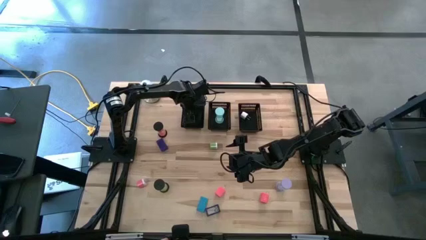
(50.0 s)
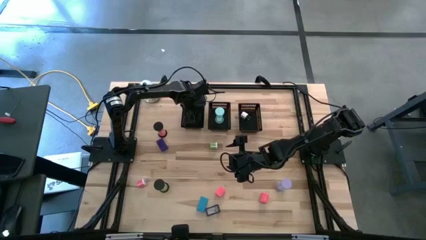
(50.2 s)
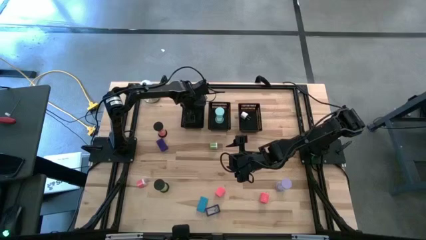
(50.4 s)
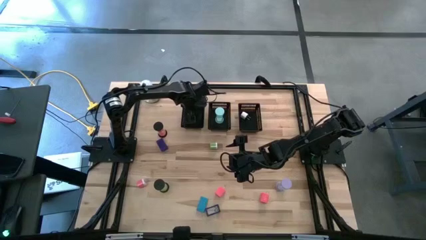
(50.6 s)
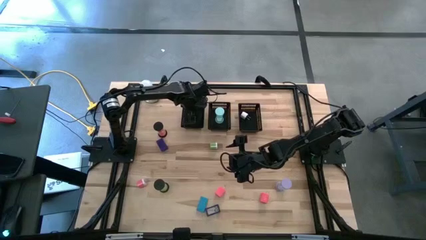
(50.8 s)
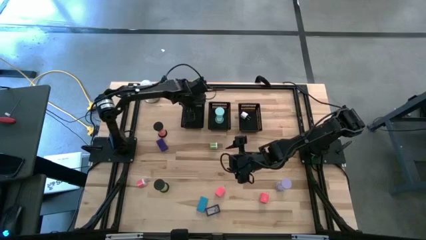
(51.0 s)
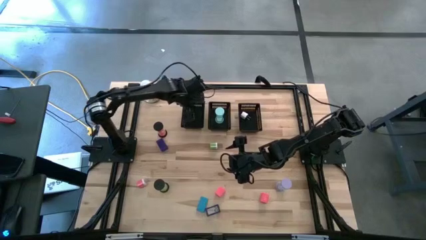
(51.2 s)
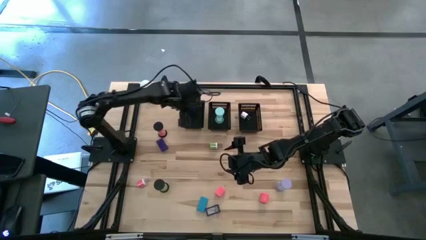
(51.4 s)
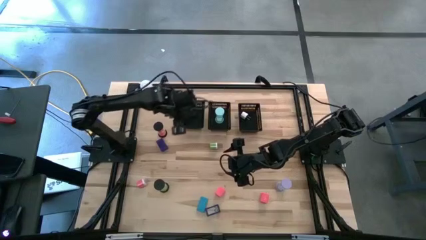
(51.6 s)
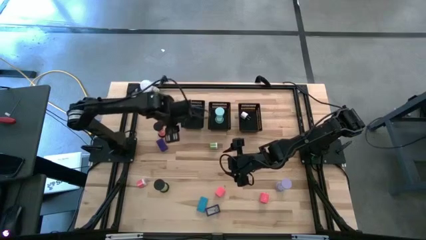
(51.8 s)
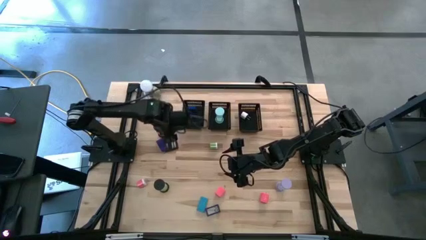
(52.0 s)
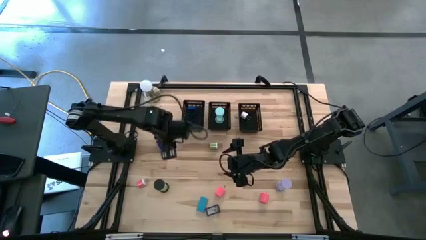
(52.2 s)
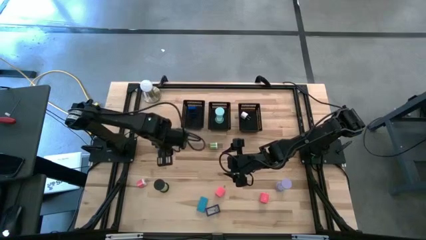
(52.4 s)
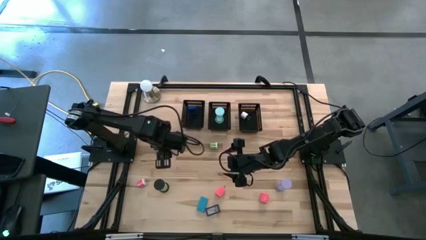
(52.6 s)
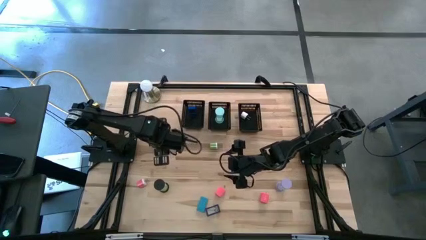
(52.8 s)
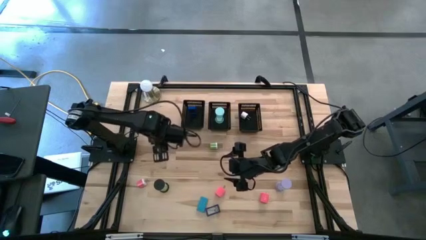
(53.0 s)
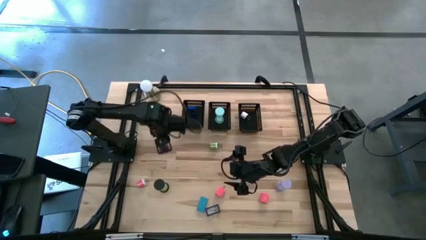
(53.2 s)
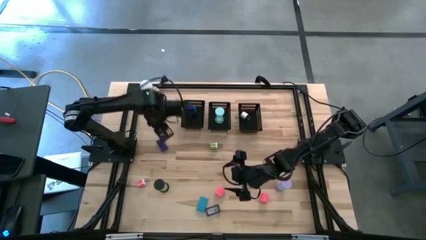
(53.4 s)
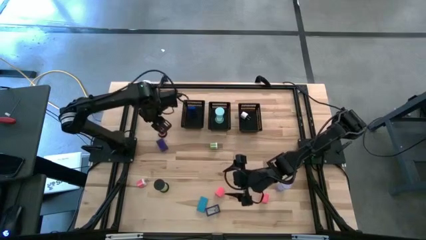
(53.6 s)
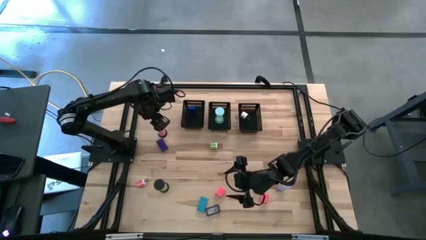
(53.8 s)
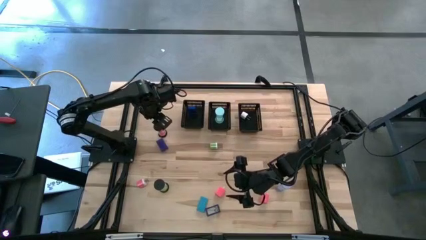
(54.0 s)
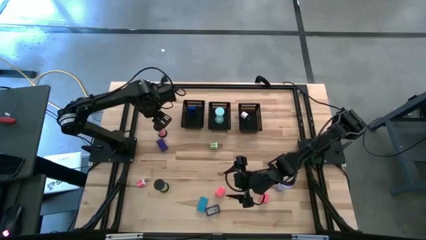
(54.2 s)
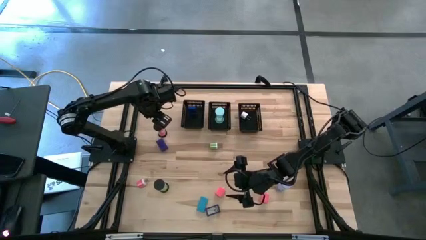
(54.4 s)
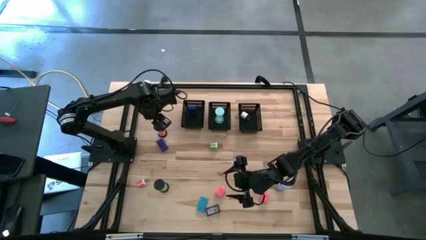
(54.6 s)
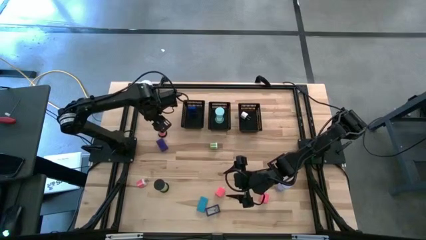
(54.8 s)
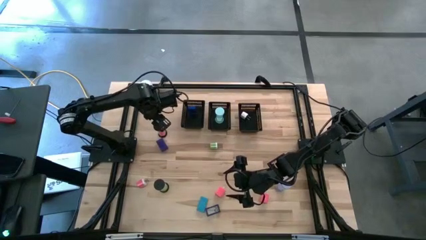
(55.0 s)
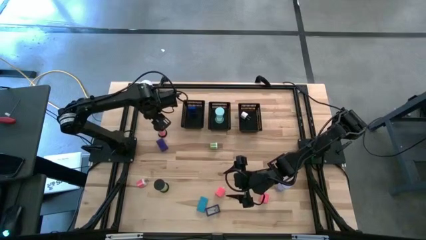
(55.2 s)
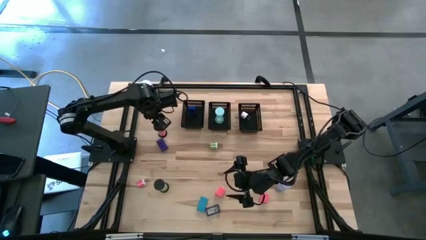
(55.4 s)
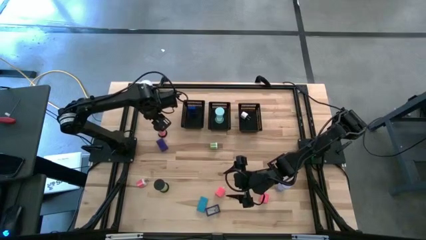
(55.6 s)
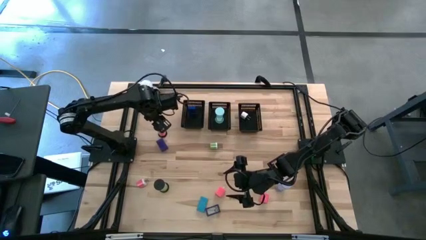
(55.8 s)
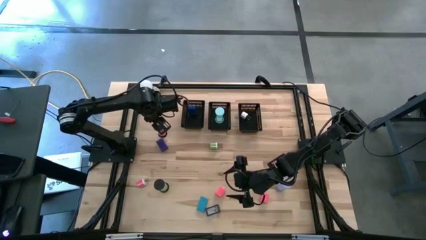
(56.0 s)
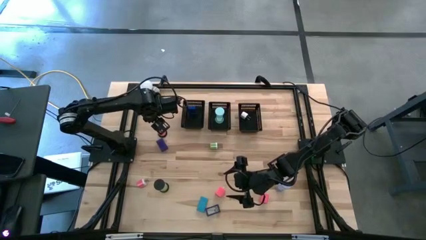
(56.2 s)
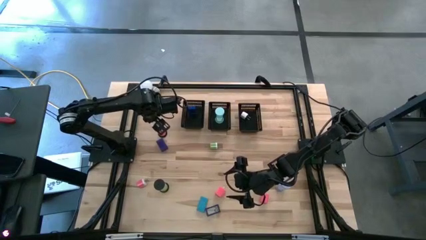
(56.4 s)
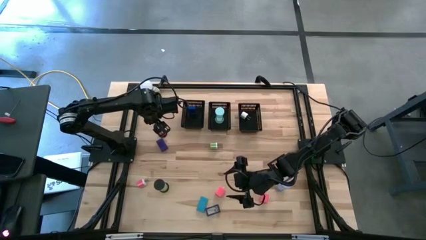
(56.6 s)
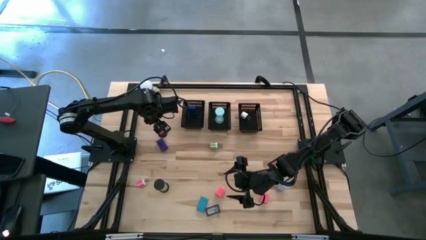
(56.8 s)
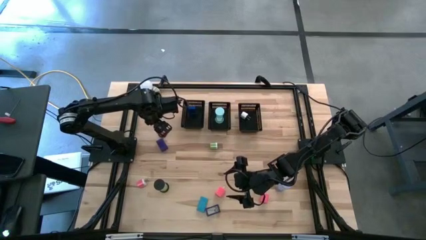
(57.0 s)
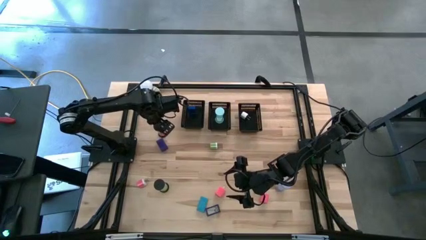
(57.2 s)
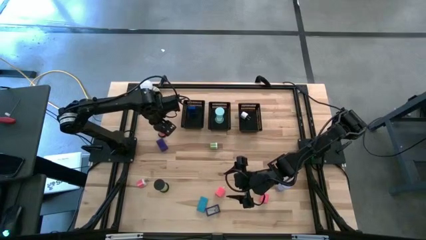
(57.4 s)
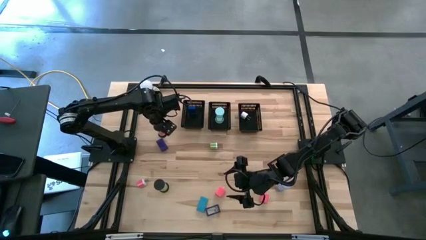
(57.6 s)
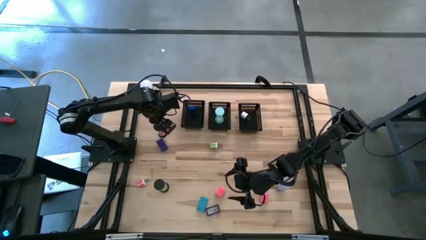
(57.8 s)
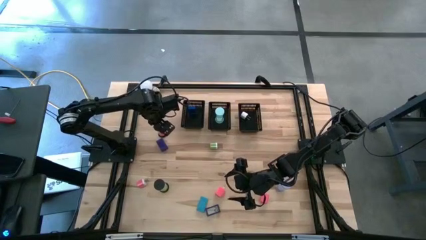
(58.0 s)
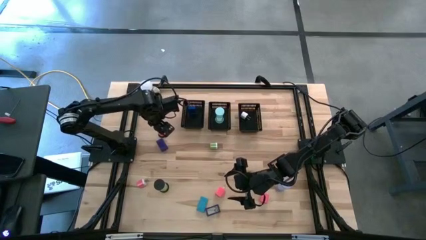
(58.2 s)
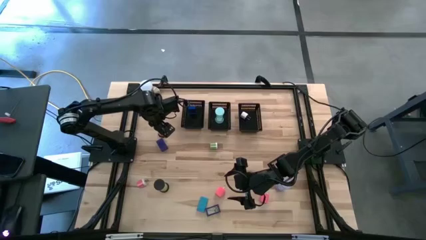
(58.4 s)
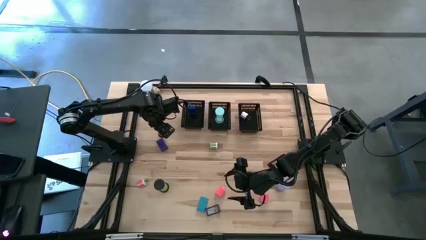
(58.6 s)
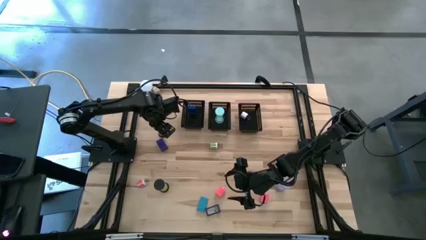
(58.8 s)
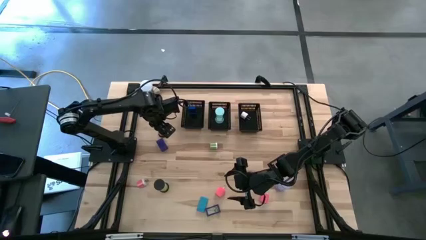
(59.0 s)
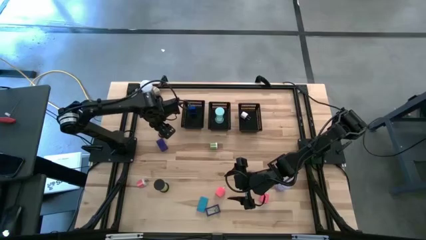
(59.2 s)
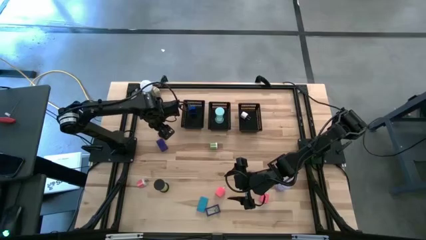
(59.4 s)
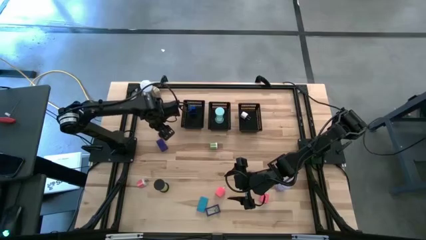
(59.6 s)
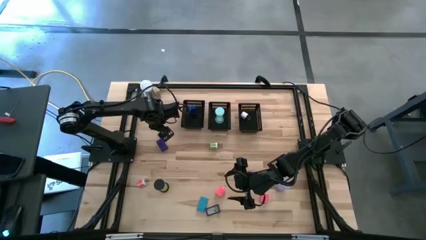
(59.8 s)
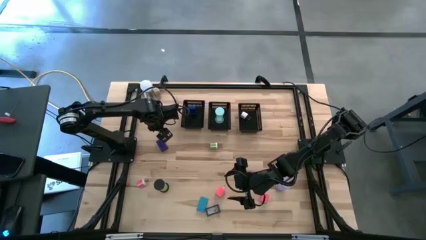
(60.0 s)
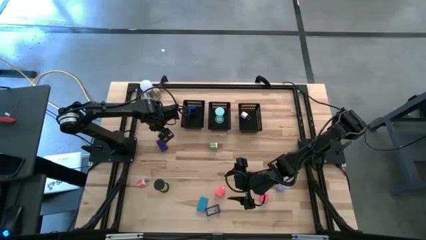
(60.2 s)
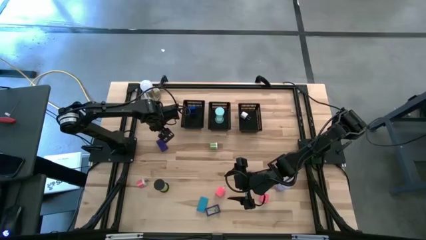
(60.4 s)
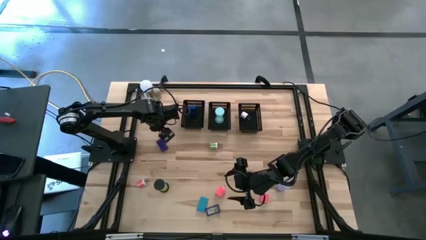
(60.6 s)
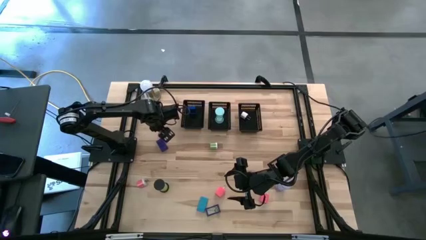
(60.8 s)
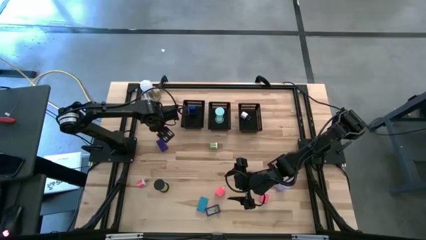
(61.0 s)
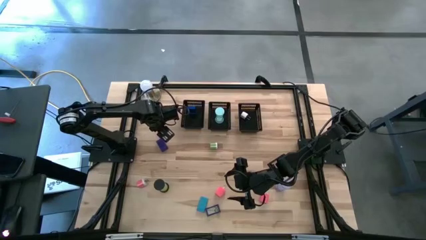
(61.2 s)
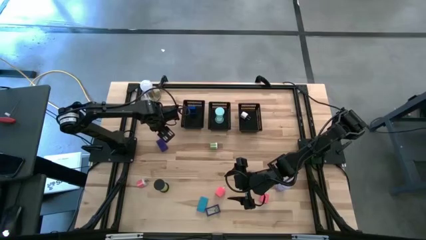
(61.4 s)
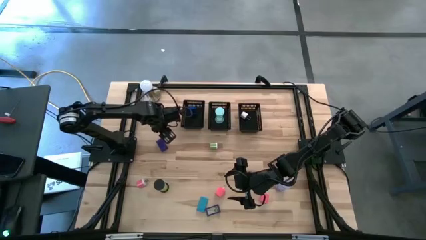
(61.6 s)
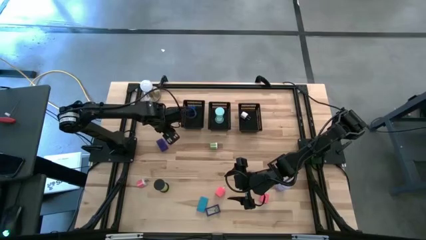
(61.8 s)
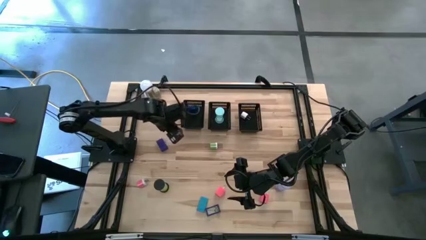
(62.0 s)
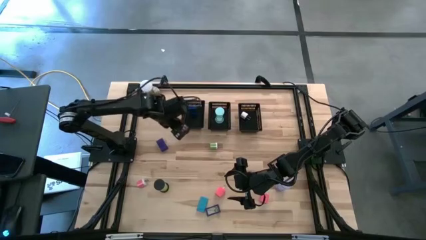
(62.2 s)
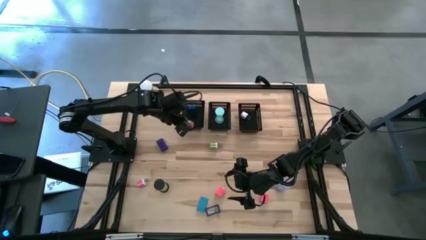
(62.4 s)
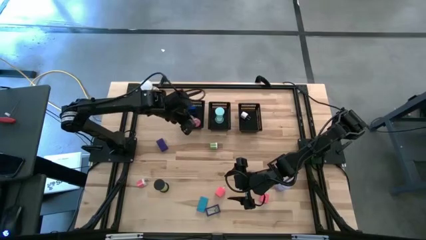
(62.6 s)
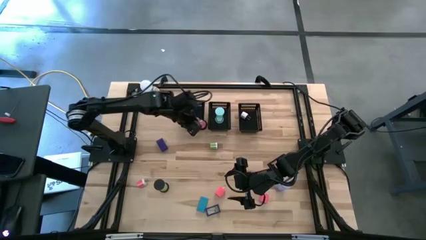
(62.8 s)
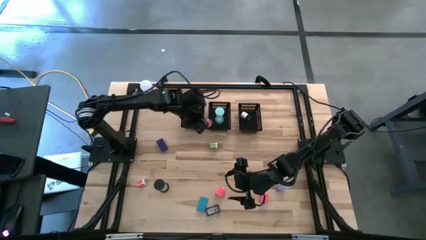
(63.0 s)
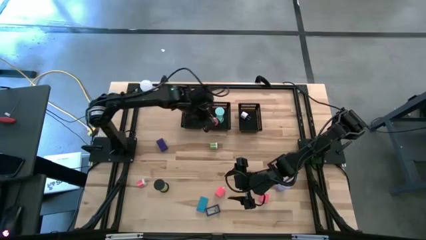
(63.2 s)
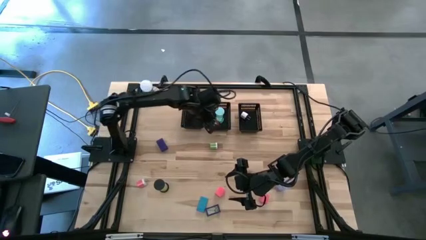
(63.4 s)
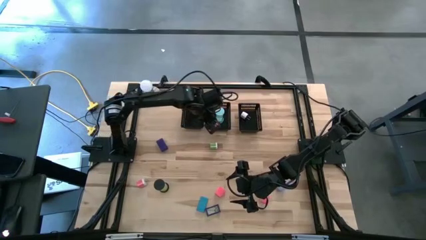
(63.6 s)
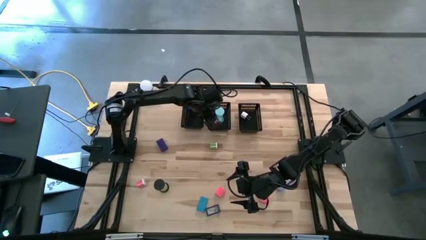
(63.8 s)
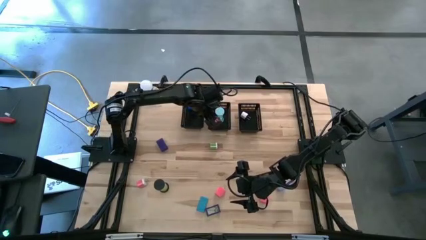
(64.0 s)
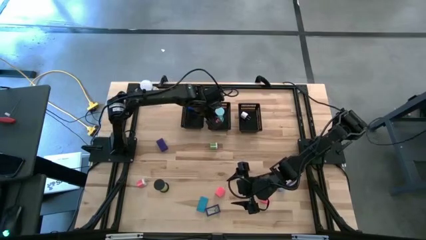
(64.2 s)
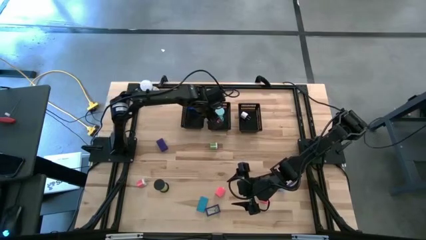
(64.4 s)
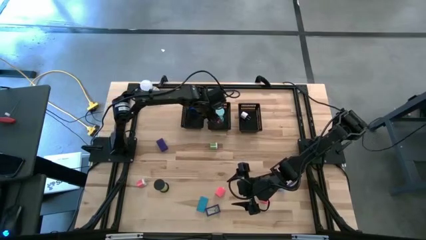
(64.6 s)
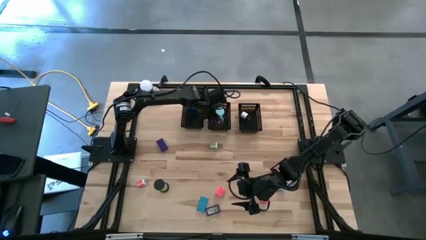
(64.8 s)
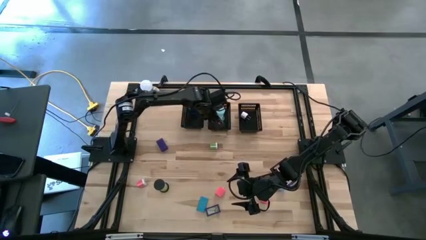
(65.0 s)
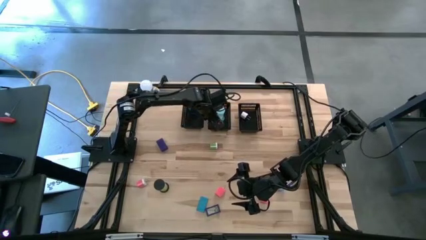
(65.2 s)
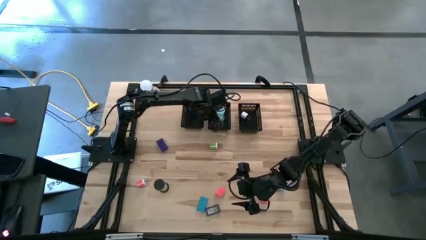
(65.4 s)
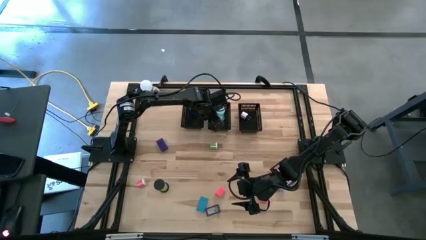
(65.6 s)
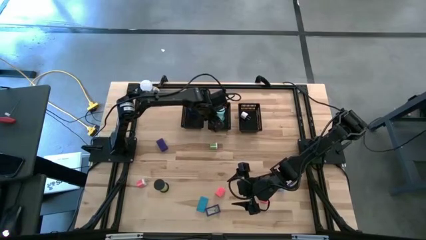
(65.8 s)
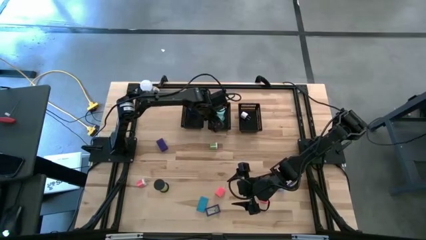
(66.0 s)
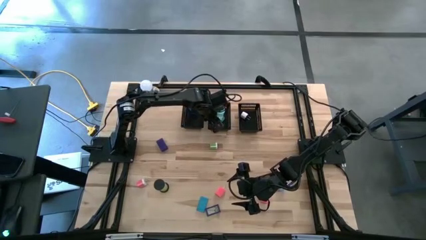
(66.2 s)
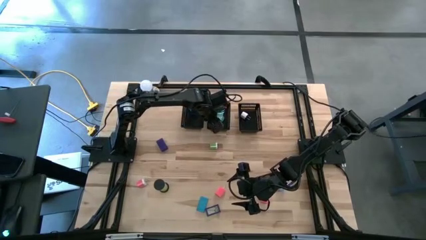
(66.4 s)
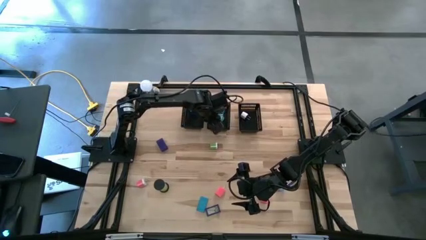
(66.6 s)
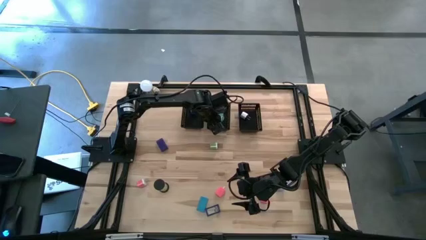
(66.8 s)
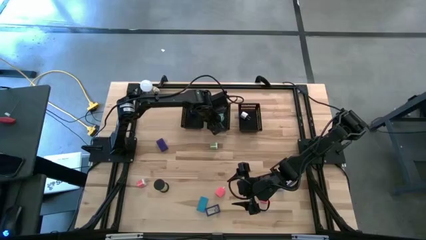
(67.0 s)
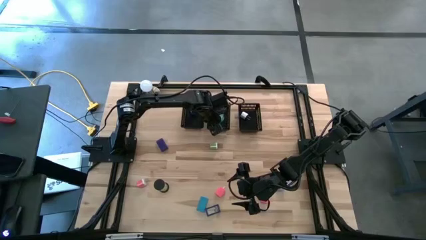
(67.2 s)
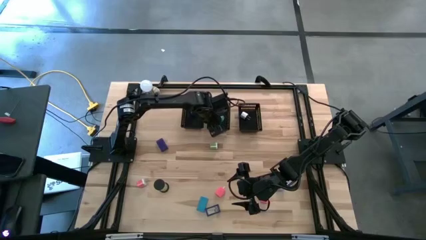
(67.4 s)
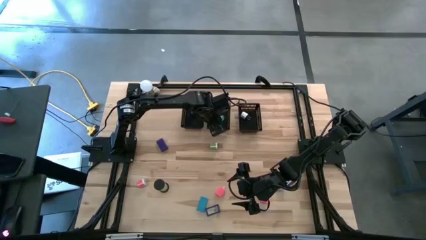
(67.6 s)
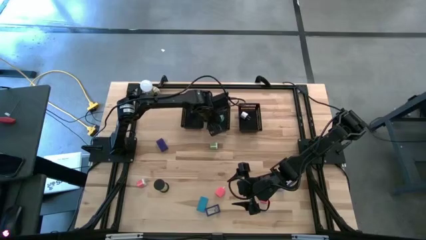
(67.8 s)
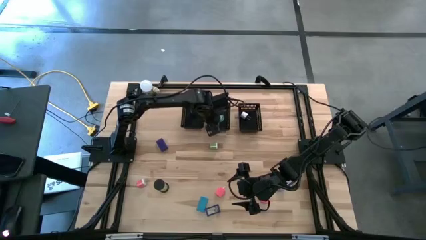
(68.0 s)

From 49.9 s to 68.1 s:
Task: Pick & Place Office items
Put the pink hourglass into the middle black bin
